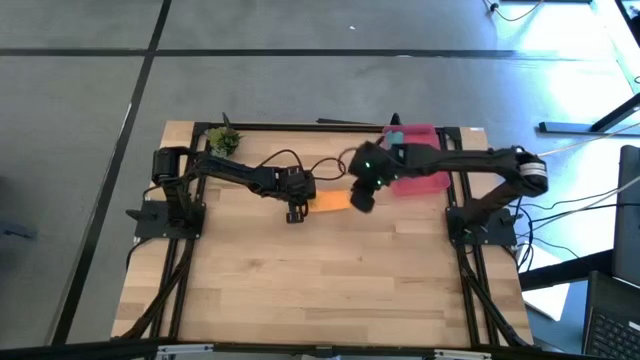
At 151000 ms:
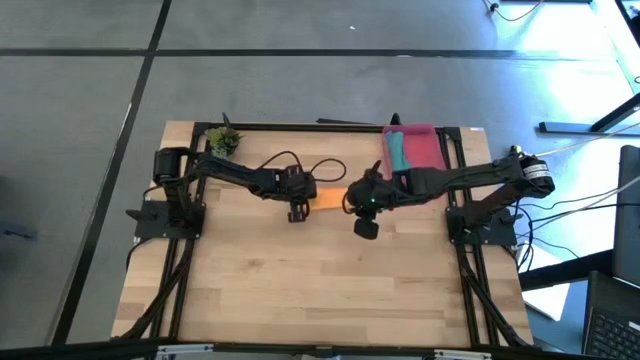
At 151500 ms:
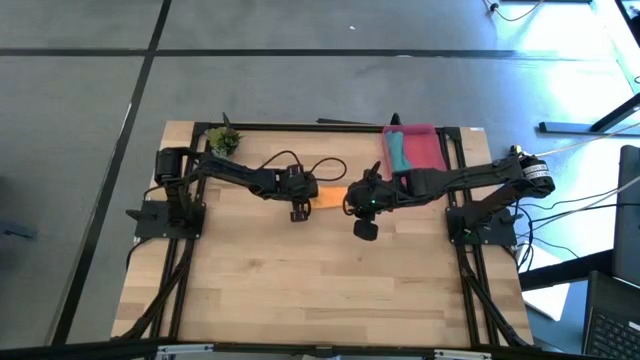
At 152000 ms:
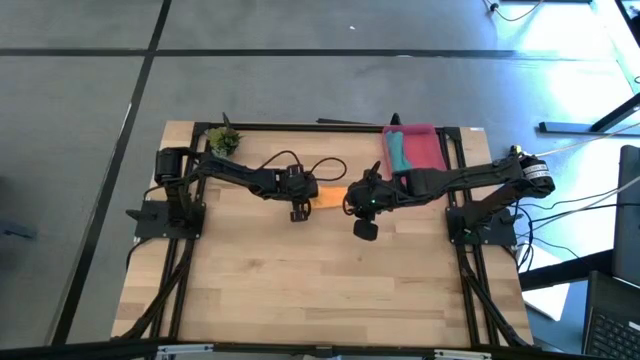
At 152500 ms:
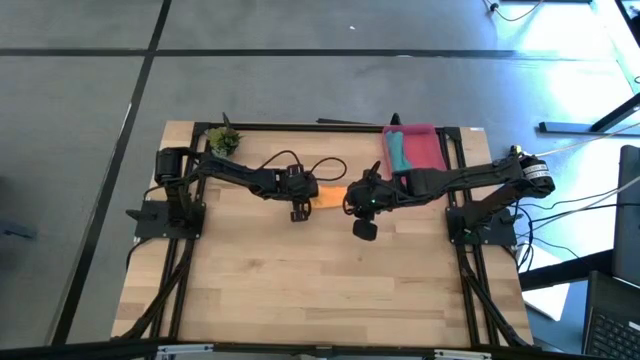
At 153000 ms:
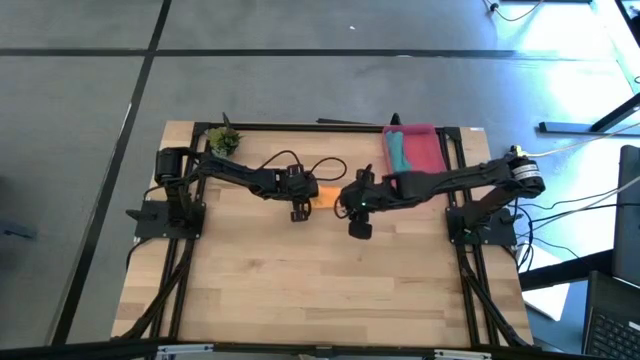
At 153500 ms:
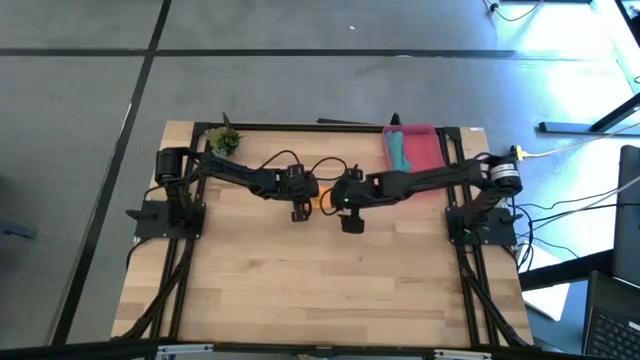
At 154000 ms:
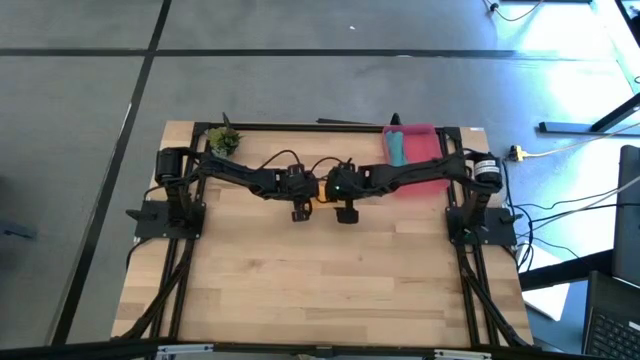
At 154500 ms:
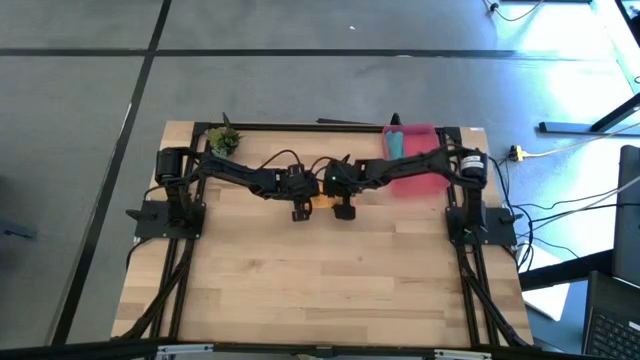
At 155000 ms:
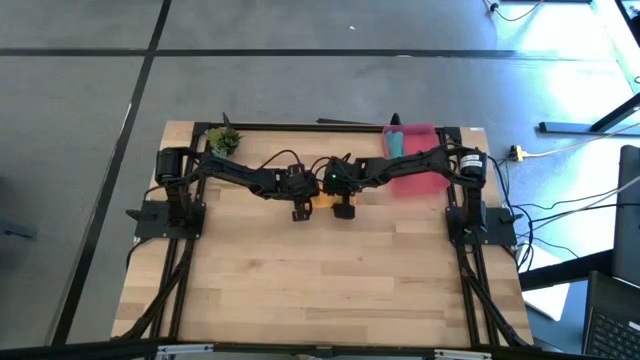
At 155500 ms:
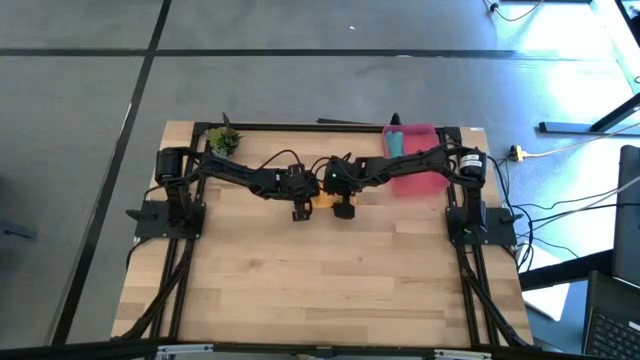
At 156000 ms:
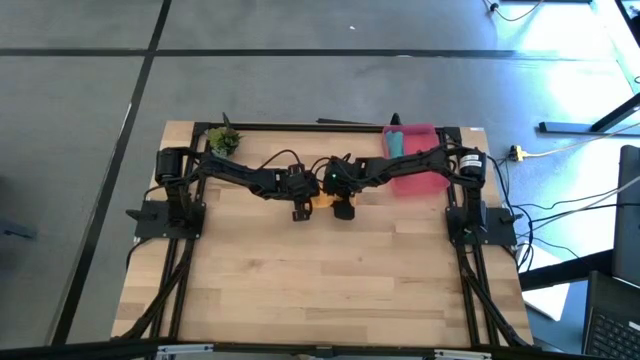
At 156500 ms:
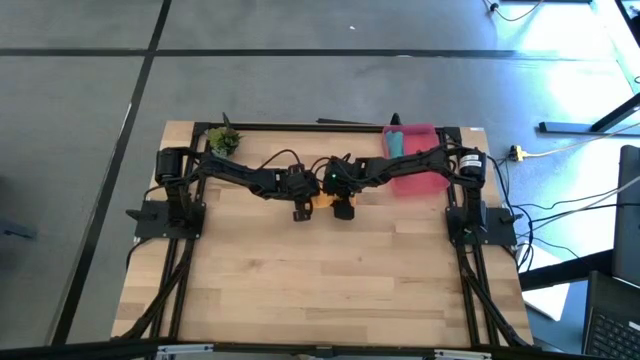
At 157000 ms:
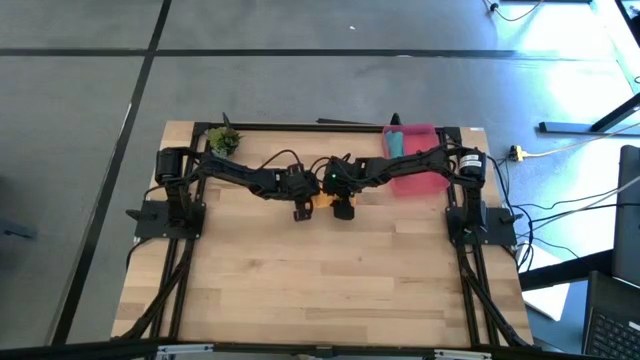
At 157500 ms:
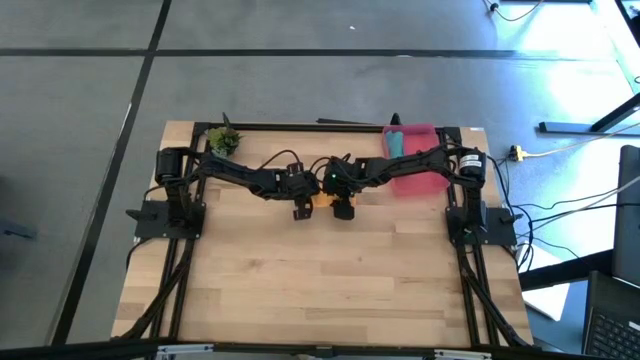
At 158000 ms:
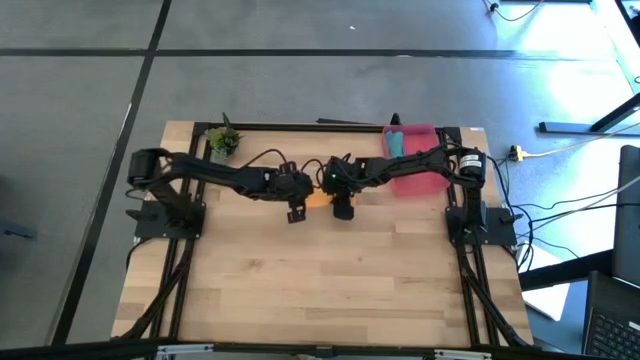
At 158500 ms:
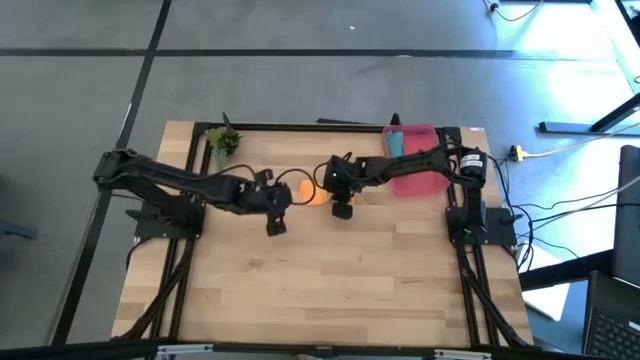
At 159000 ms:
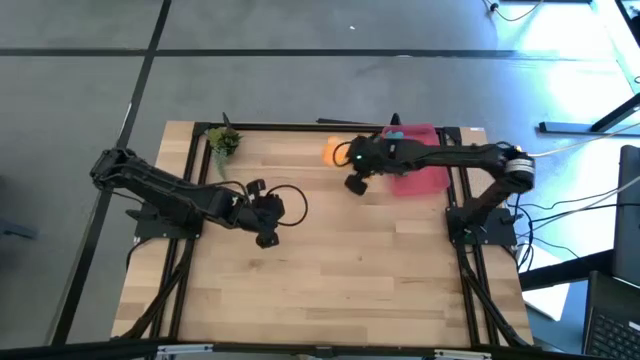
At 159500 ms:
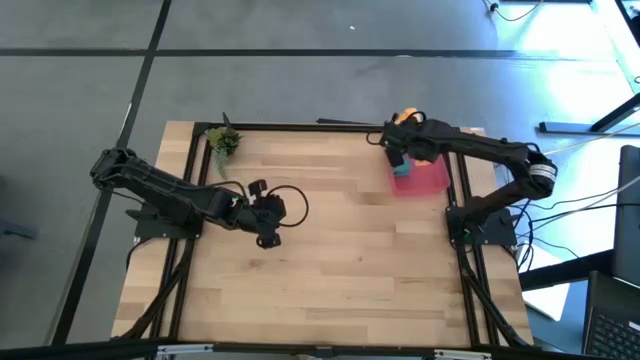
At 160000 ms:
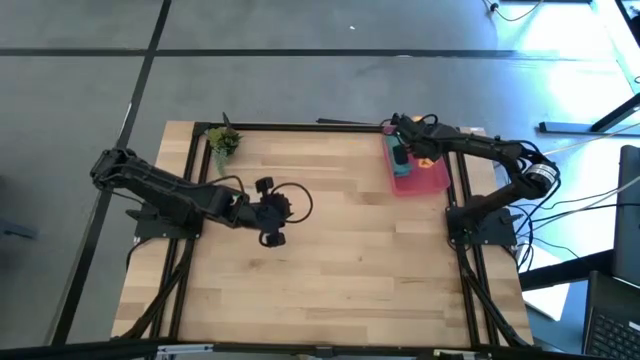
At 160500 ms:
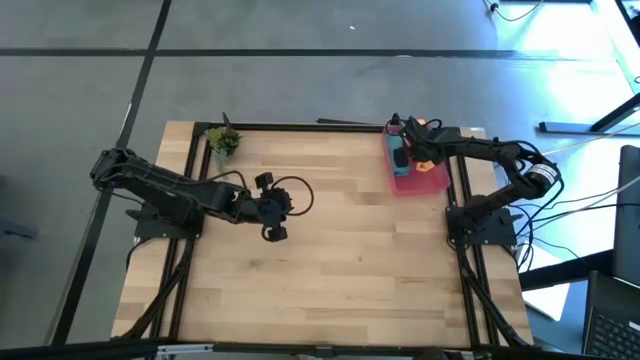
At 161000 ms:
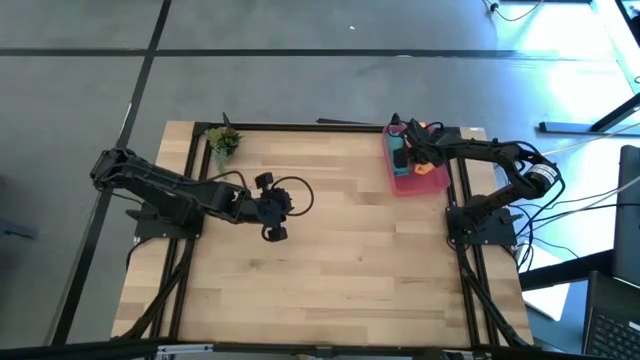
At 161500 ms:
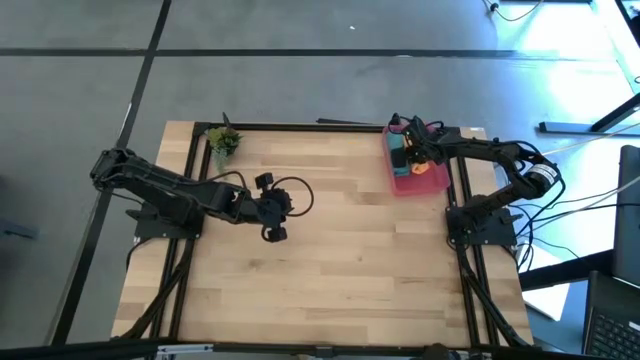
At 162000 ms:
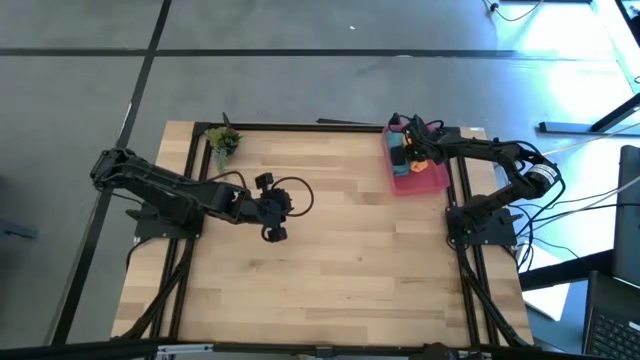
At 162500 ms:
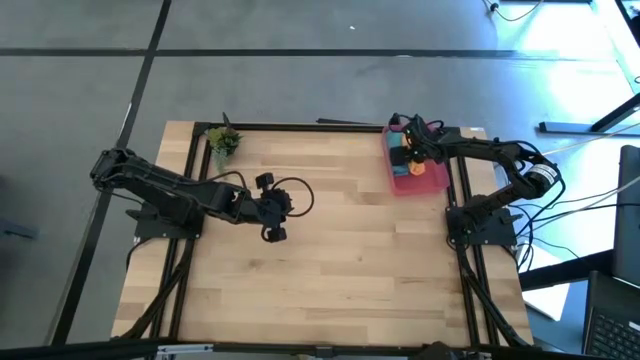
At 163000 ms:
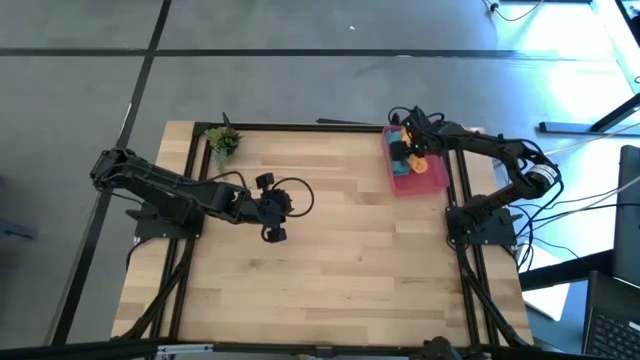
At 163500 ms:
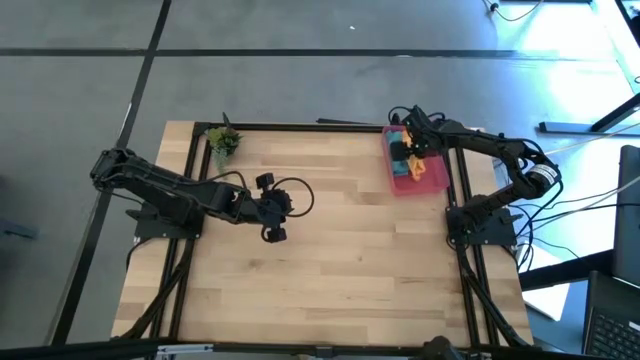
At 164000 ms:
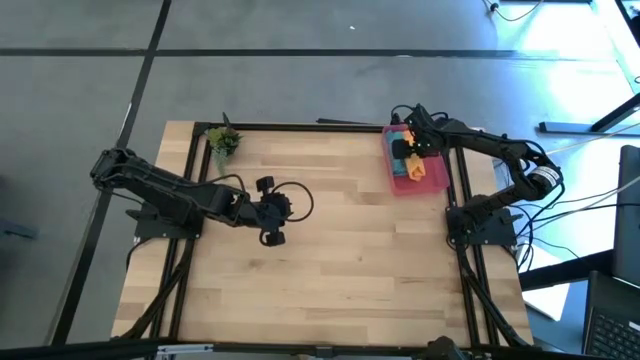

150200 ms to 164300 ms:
Task: Roll microfiber towels into tight, uniform cylinder then place into a basket
Put the yellow microfiber cloth into the pink bin

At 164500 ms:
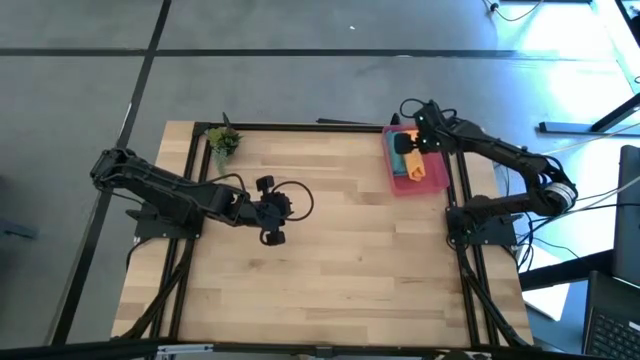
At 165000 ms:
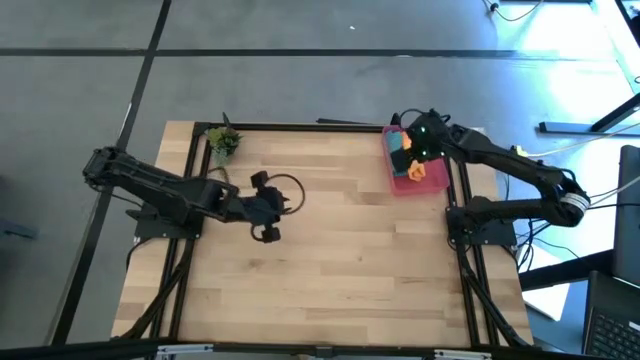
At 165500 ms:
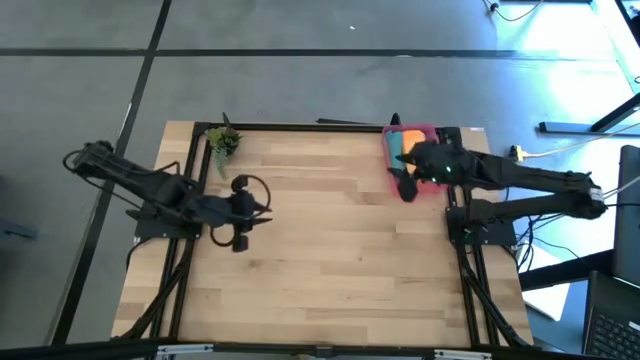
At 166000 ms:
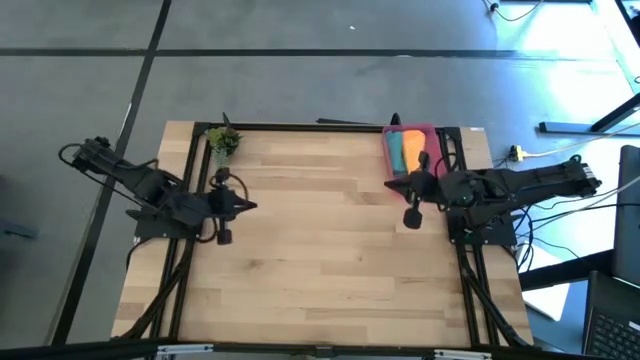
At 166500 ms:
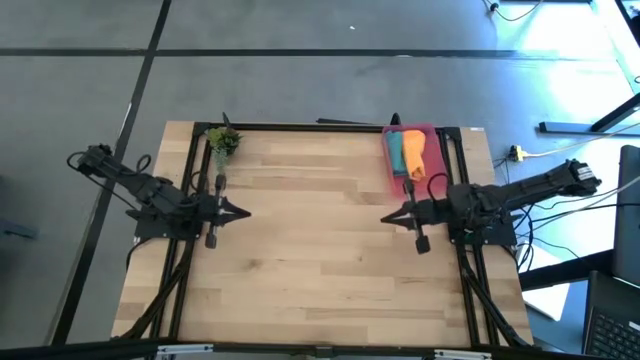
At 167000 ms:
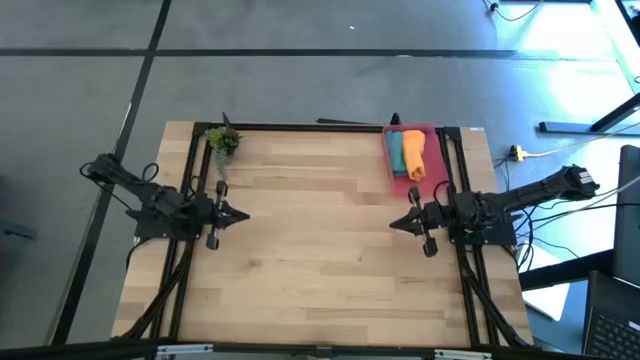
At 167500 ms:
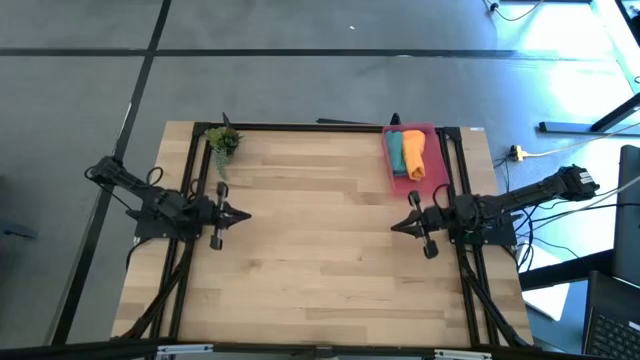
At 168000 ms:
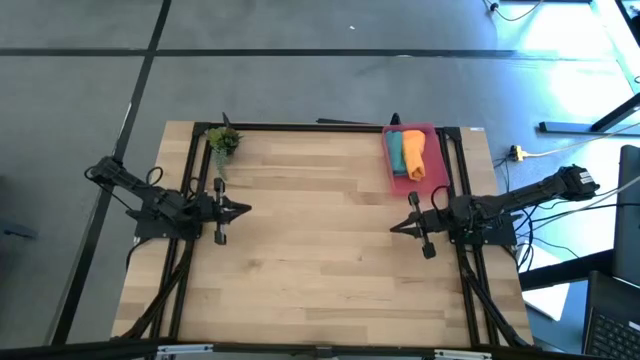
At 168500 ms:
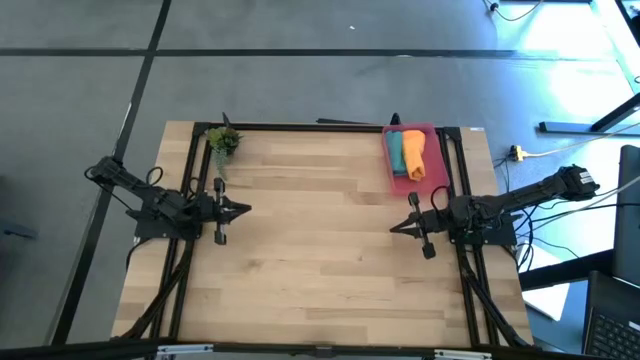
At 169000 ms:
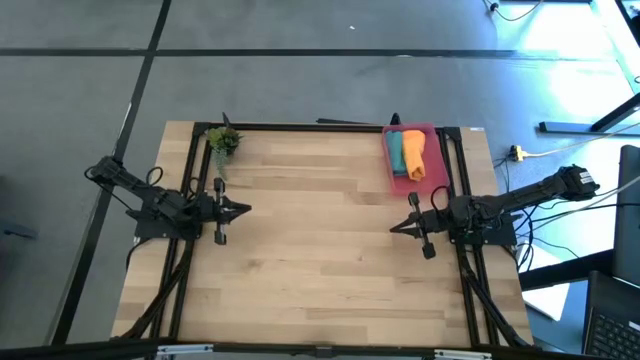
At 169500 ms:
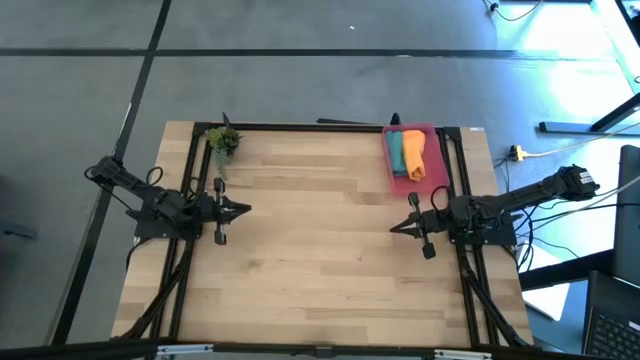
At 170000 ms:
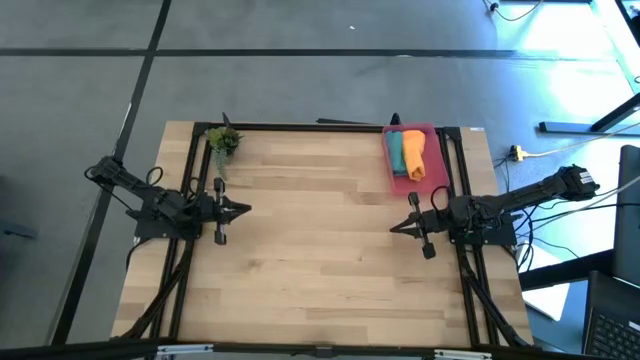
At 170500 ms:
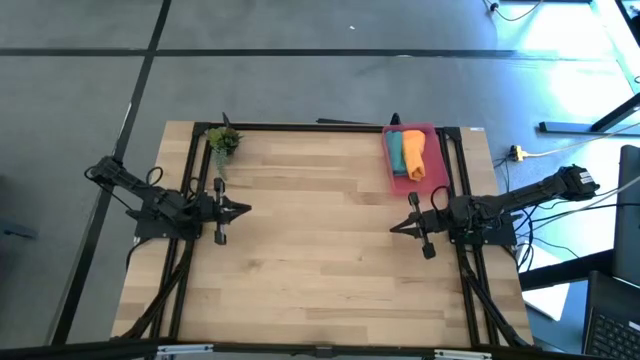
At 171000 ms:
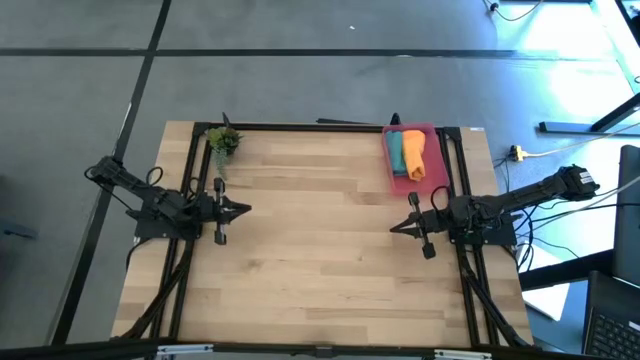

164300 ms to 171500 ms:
Return to Home Position

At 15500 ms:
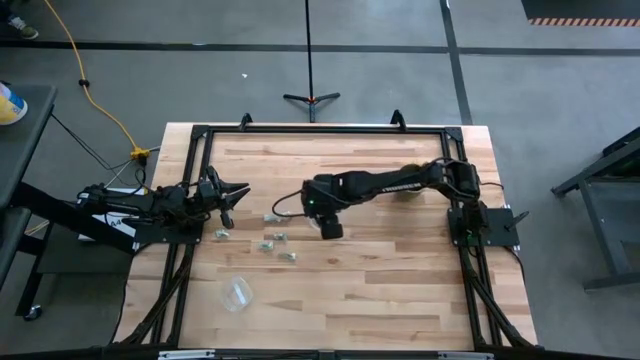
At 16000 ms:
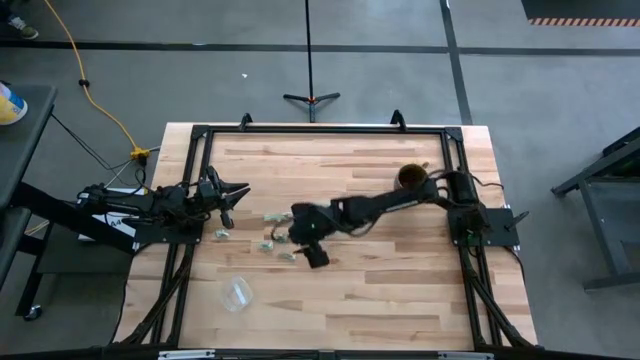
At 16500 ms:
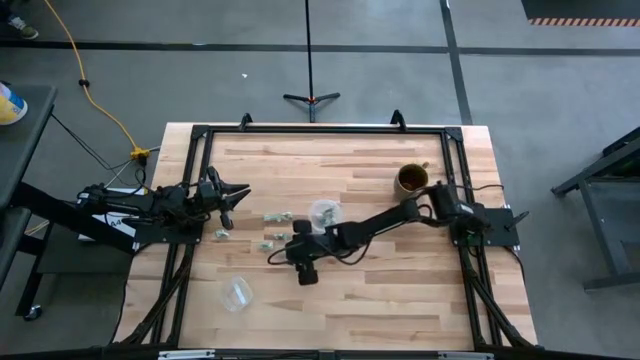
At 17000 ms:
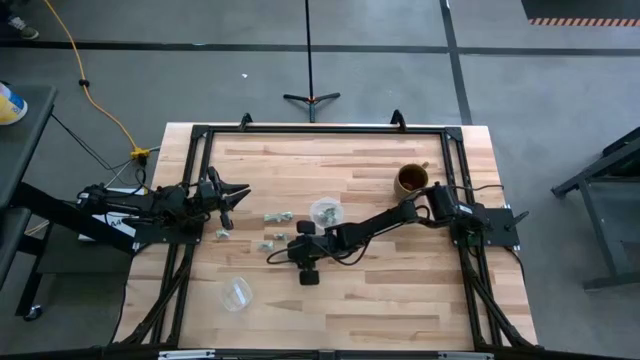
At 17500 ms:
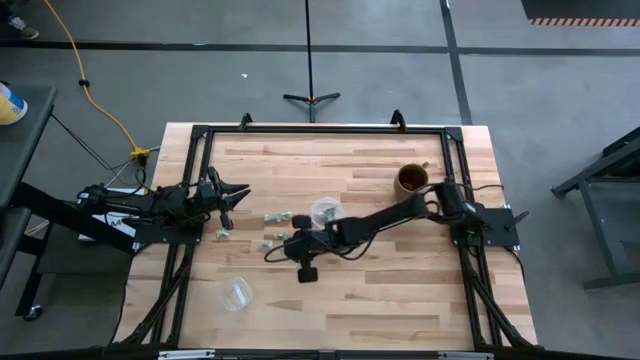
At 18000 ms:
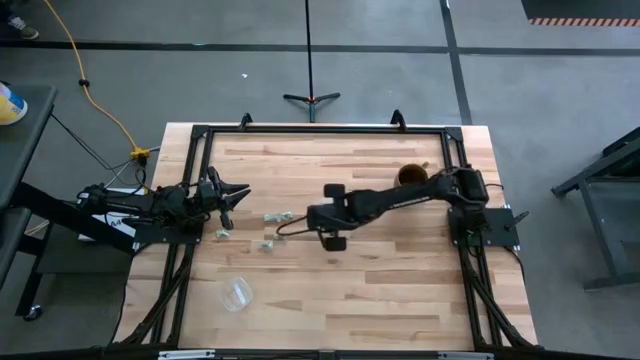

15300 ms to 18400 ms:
Task: Pick and place items into bin
Put the green stevia packet into the top transparent bin
